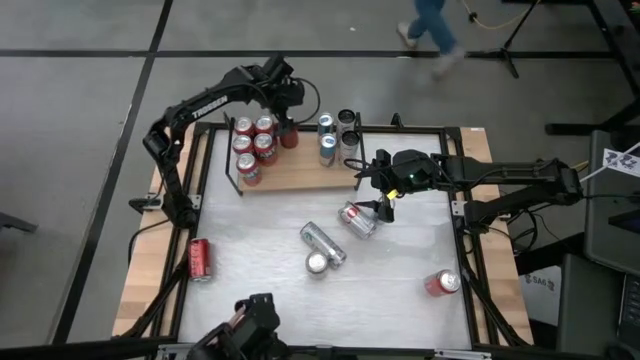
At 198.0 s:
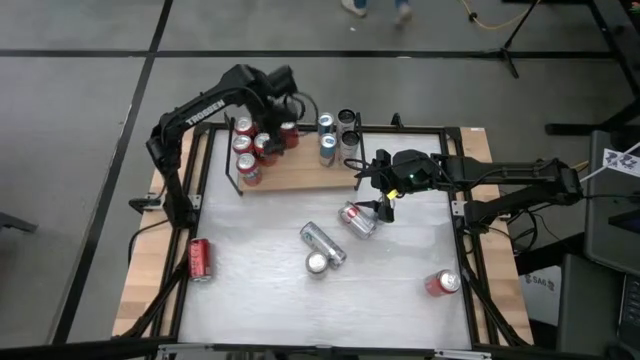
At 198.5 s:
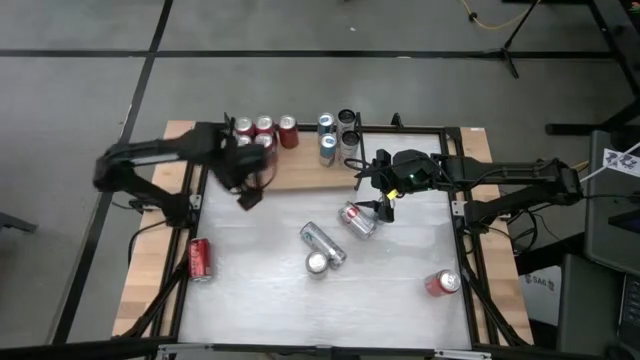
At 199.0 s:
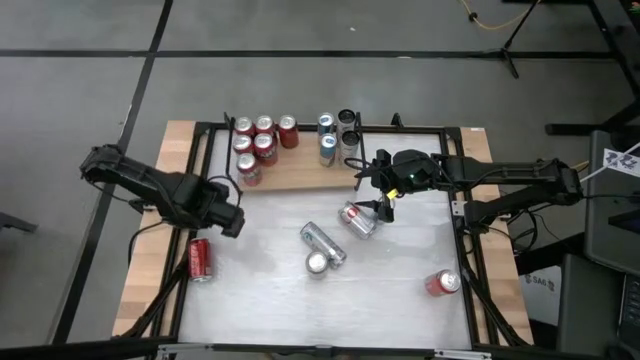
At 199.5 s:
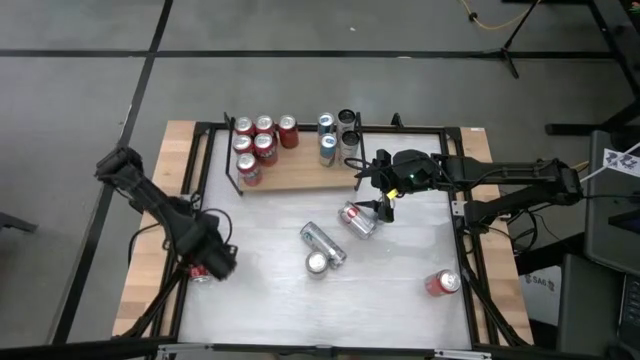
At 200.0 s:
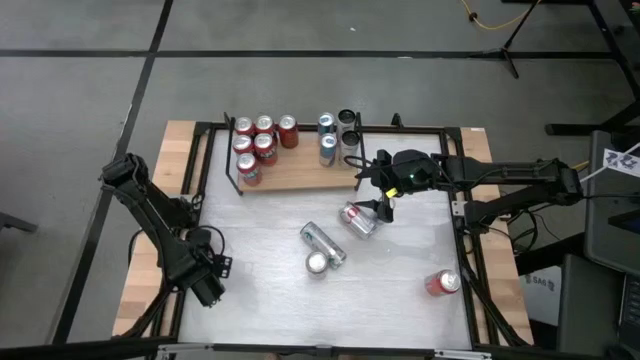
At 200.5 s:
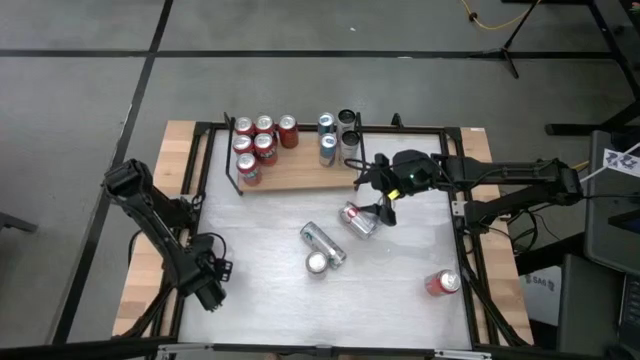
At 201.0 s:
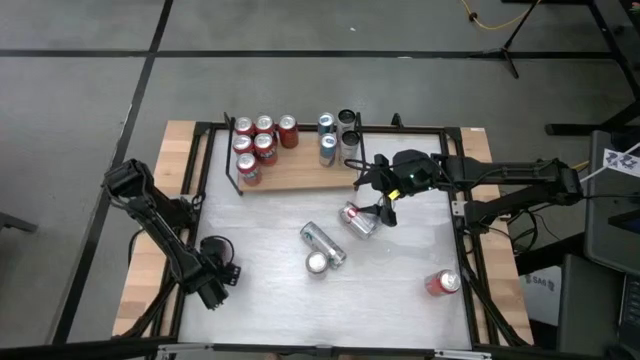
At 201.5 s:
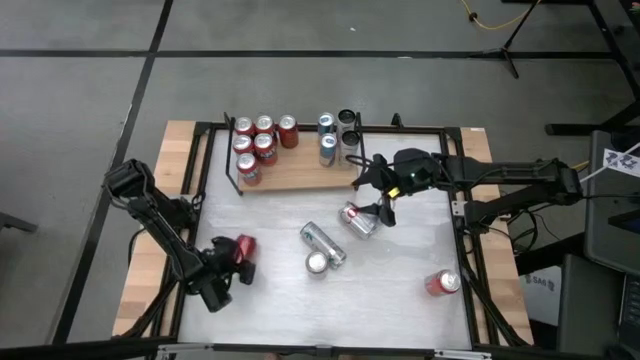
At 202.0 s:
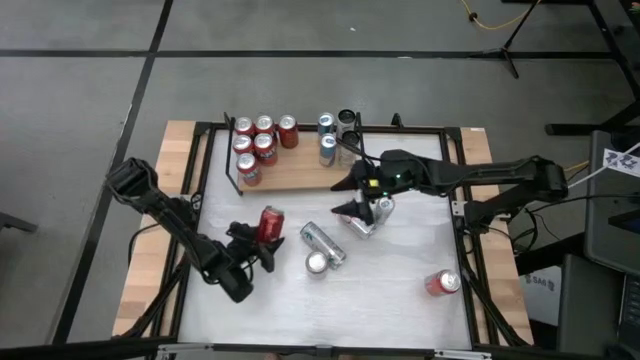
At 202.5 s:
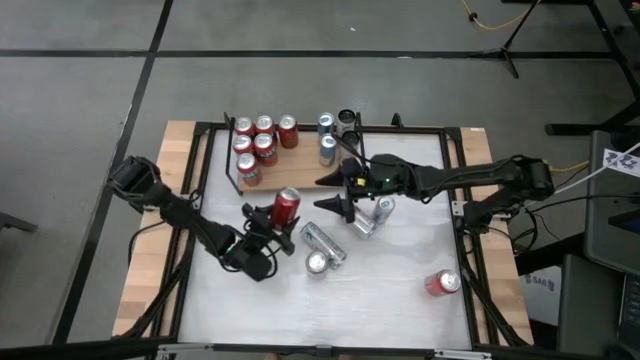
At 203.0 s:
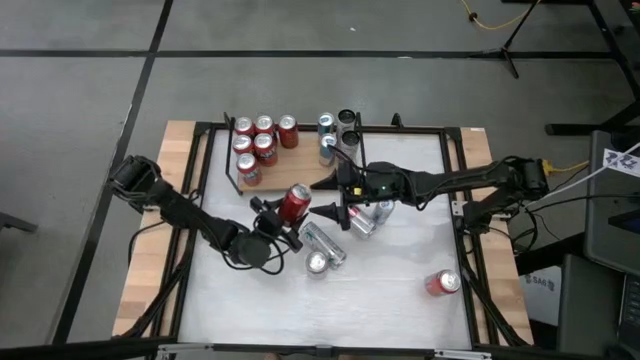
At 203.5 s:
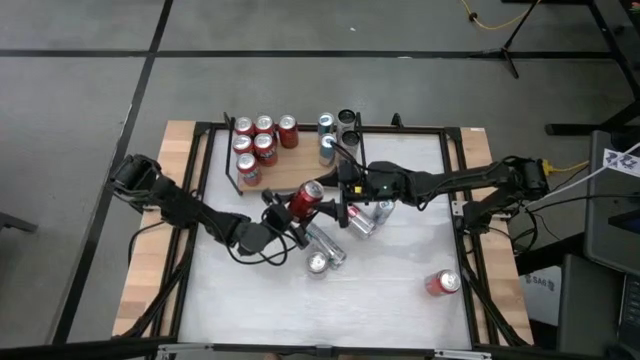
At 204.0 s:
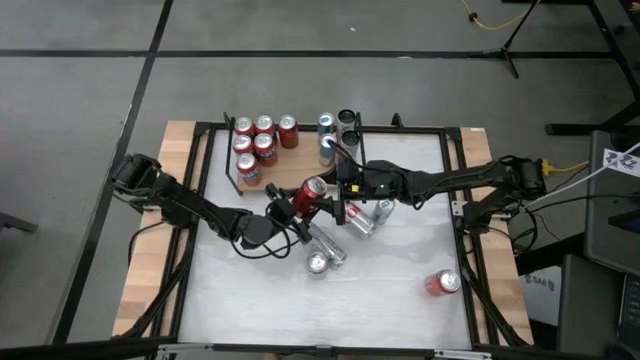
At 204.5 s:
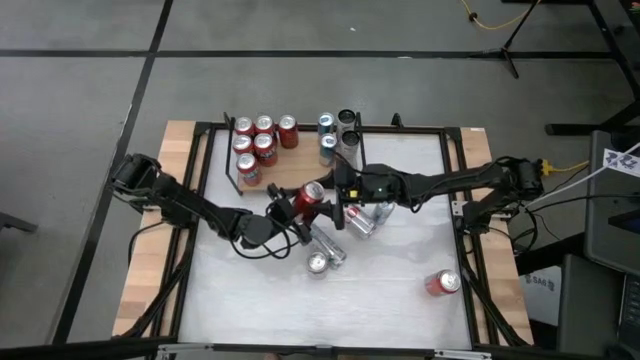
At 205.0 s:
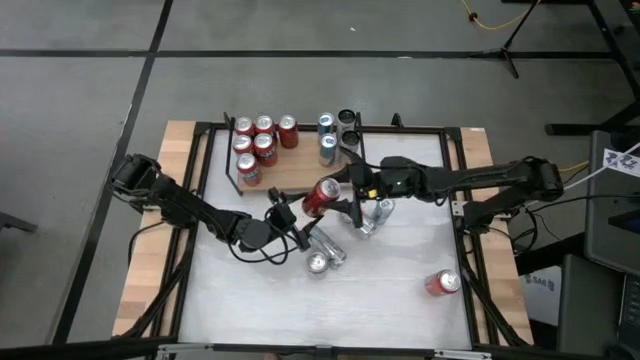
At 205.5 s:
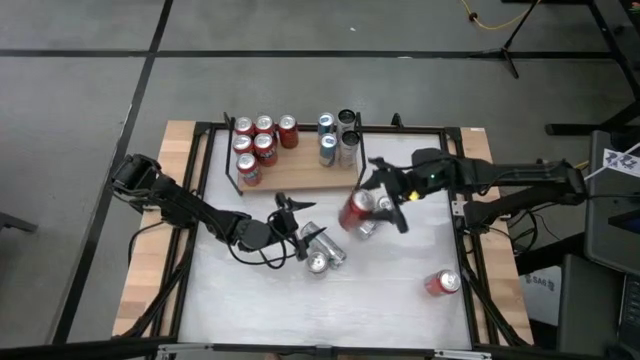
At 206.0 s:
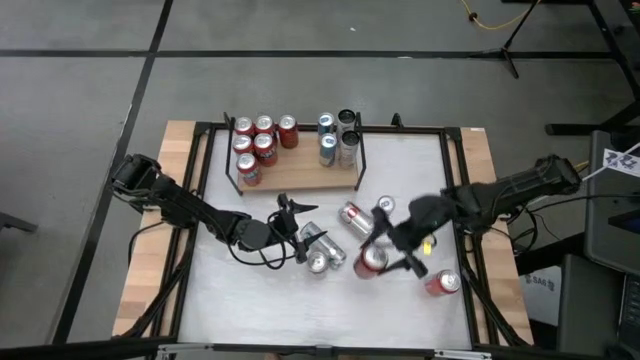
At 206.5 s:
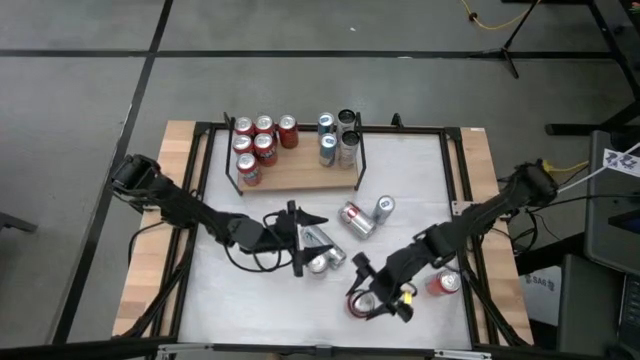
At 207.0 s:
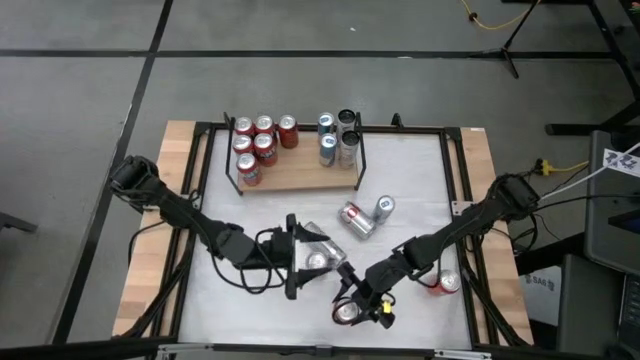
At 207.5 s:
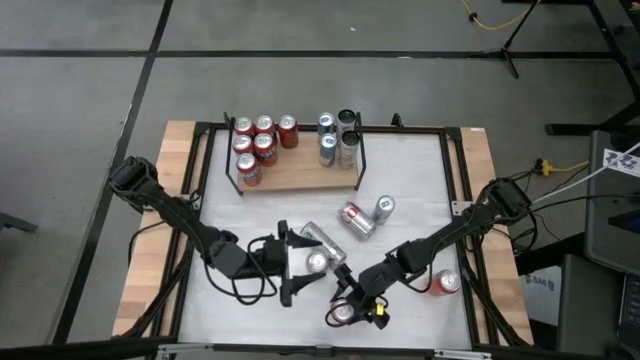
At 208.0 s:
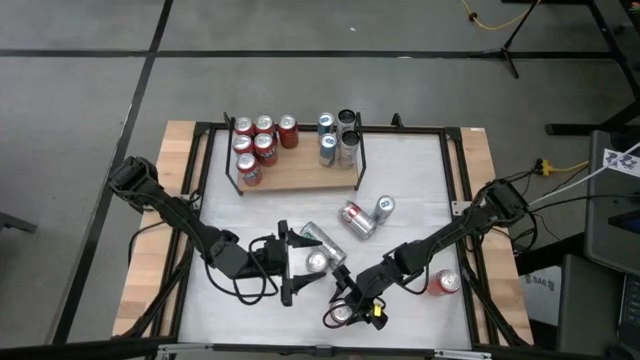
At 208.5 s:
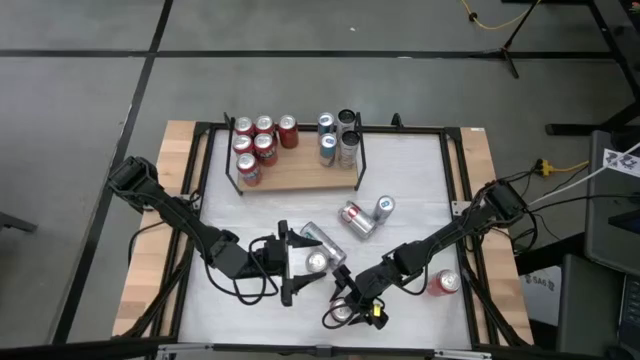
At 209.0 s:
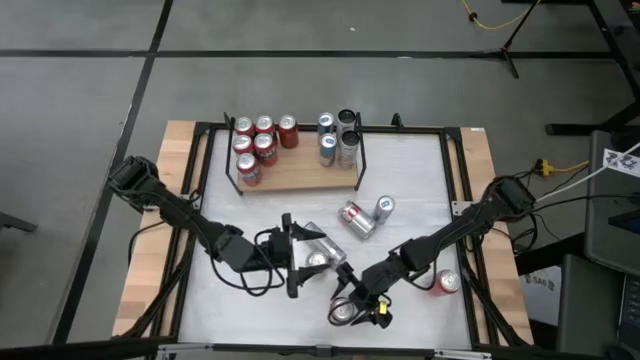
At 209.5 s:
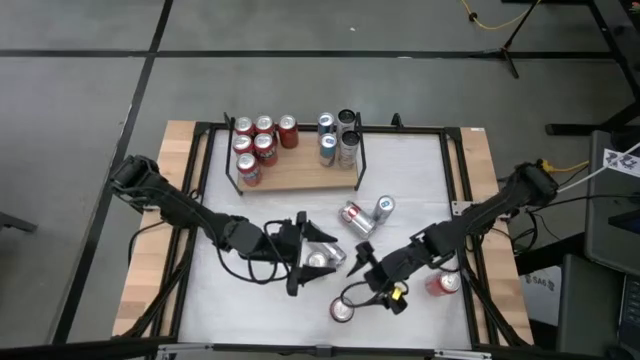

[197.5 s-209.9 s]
Task: Place canned beverage on shelf
Put the red black soda can on the shelf aligned with the other red black soda can

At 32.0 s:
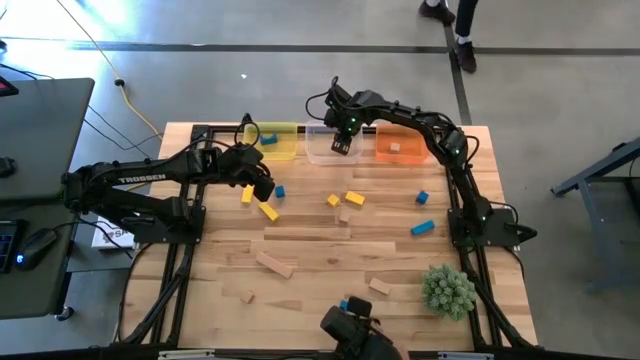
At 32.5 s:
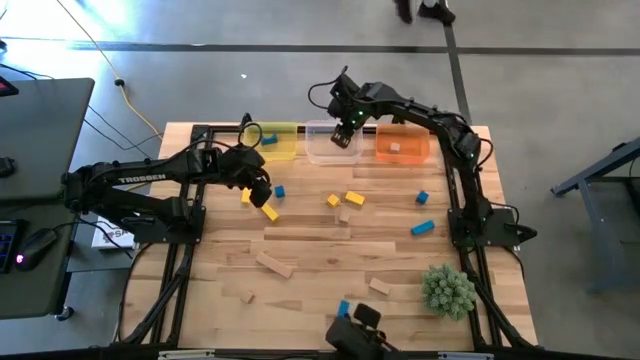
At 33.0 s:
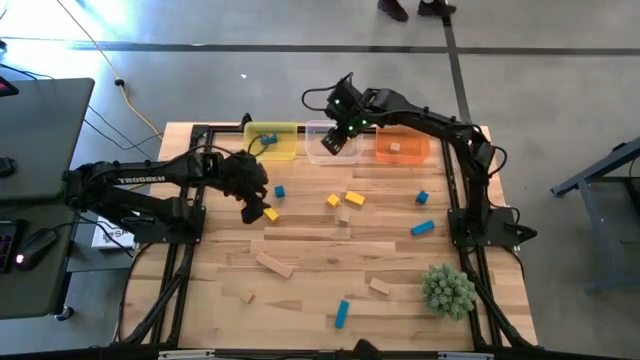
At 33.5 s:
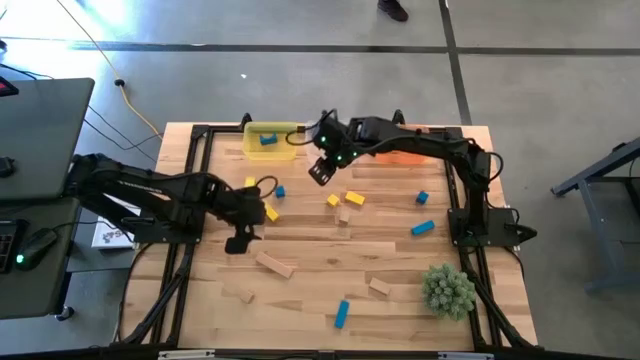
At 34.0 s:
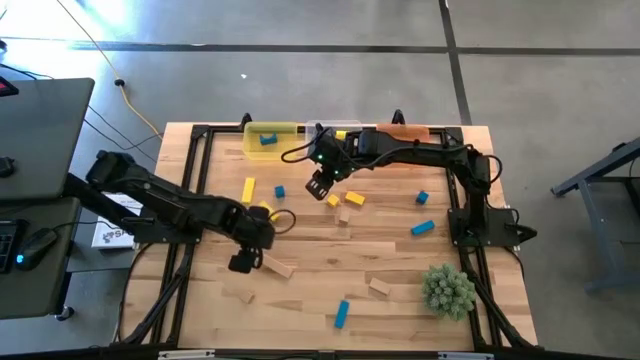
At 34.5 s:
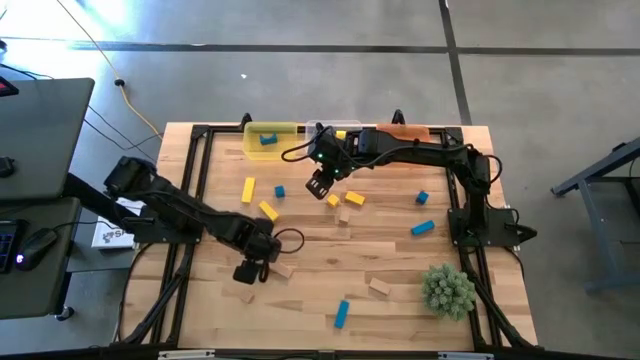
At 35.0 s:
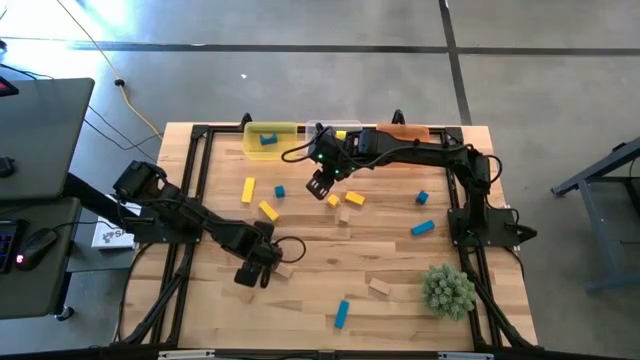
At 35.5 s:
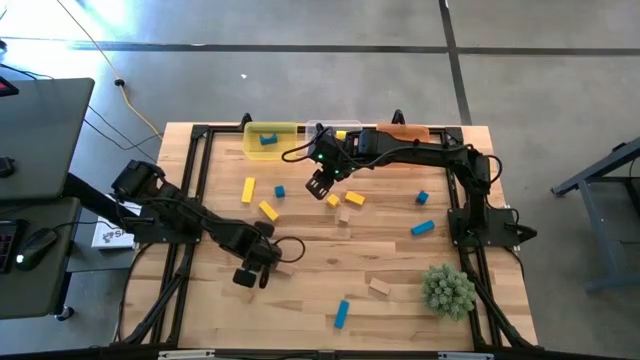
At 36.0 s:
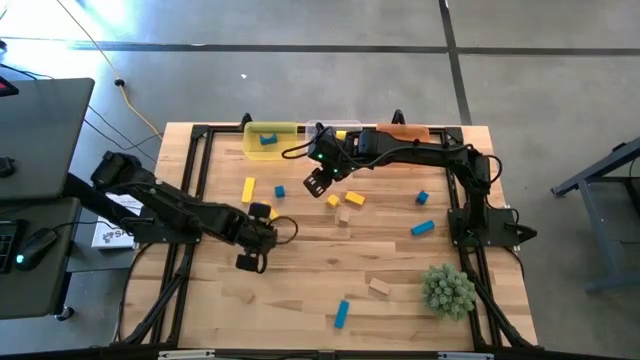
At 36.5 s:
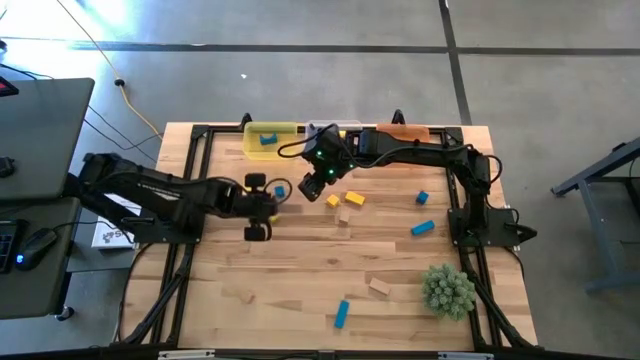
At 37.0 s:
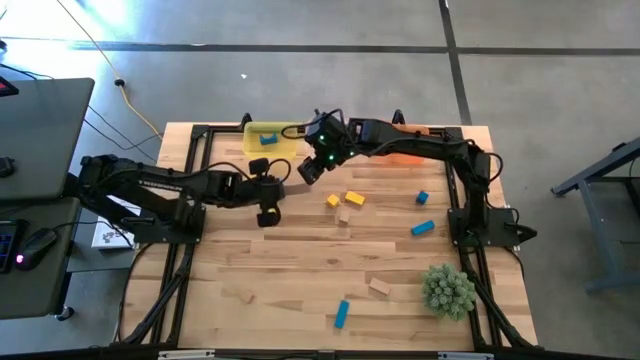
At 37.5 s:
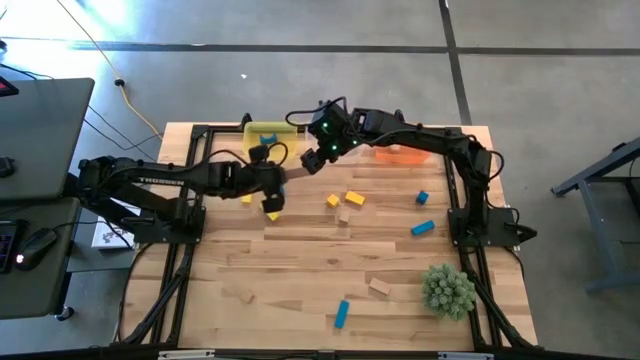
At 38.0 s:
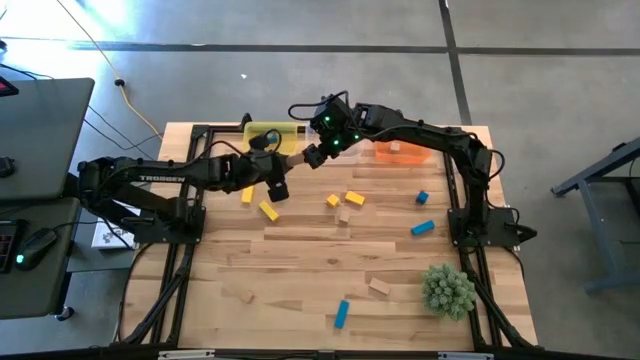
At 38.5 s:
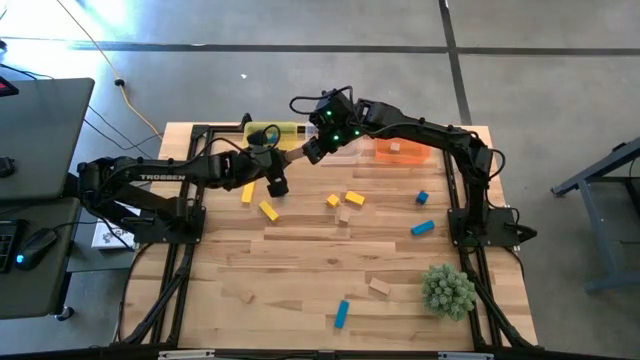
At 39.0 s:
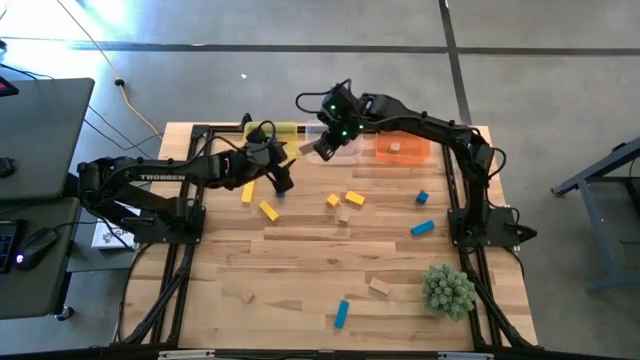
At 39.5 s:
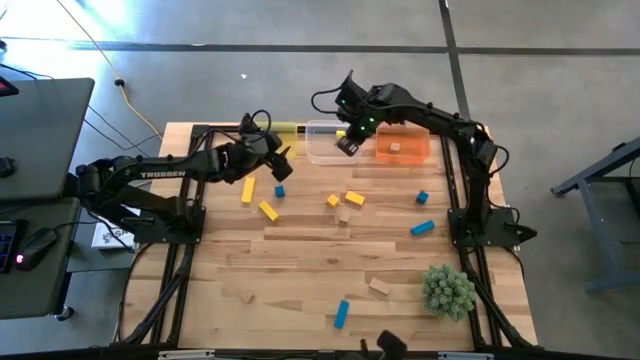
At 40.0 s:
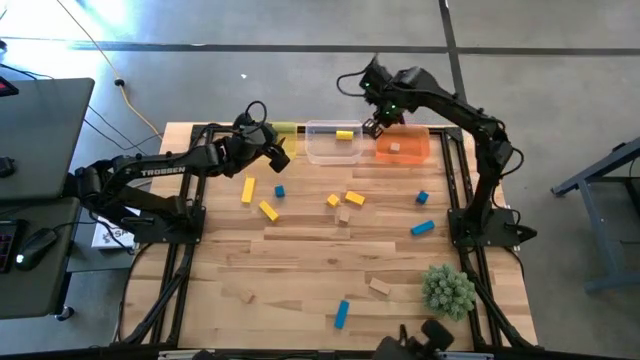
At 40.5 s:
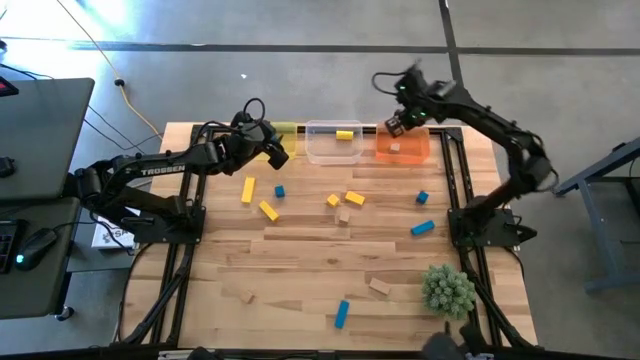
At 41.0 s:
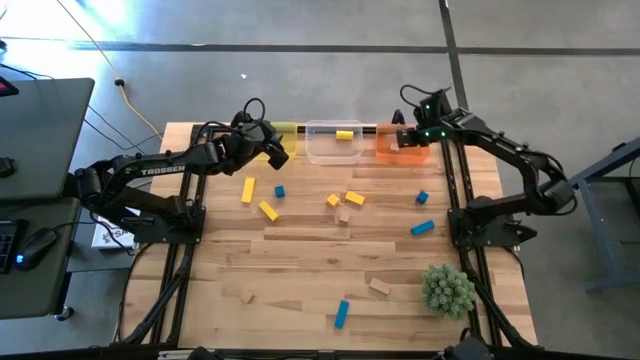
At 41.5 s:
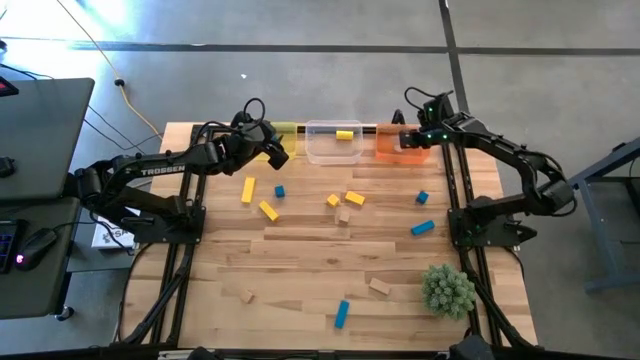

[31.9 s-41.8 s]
Task: Sort & place blocks by color
Put the brown block into the orange bin
